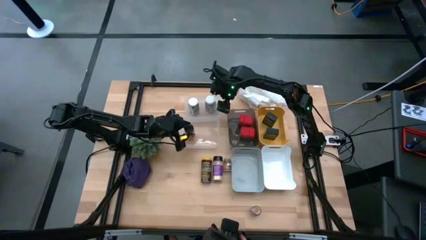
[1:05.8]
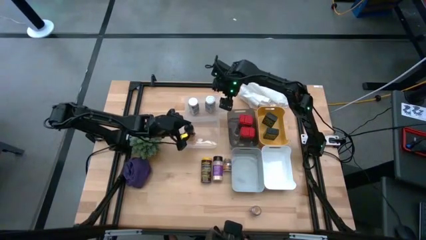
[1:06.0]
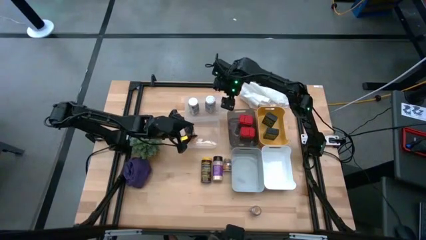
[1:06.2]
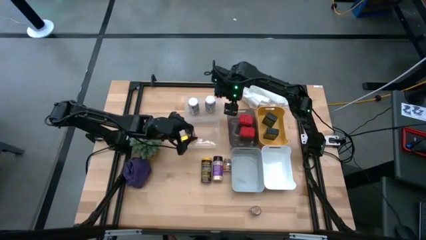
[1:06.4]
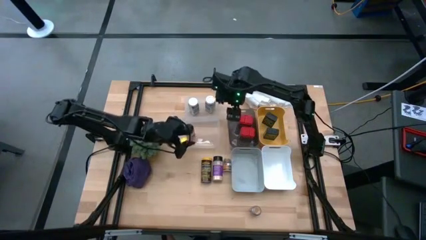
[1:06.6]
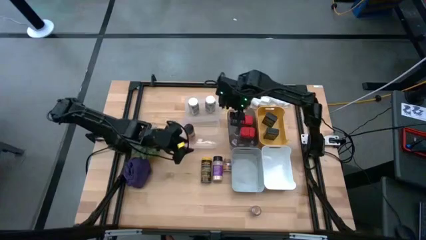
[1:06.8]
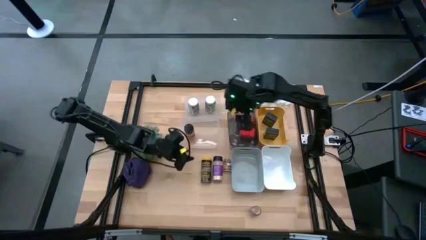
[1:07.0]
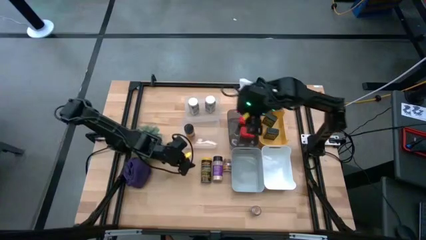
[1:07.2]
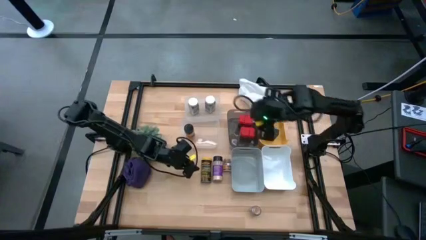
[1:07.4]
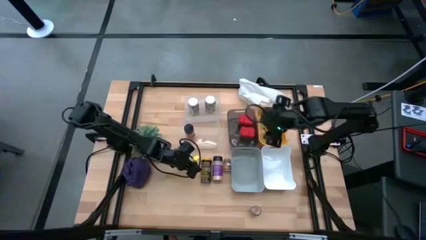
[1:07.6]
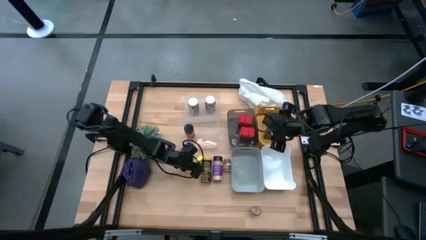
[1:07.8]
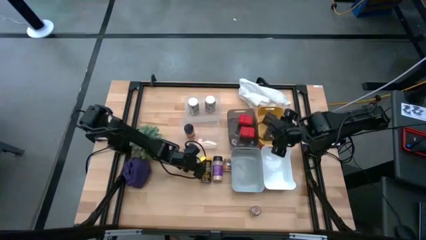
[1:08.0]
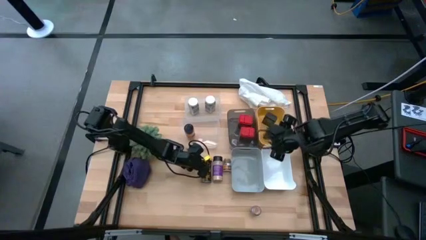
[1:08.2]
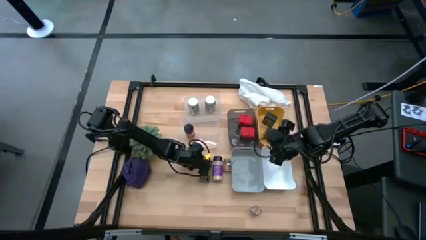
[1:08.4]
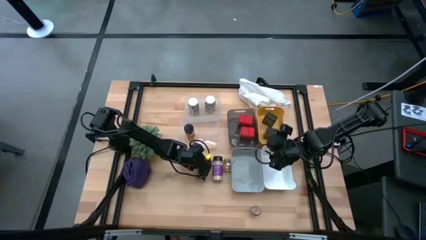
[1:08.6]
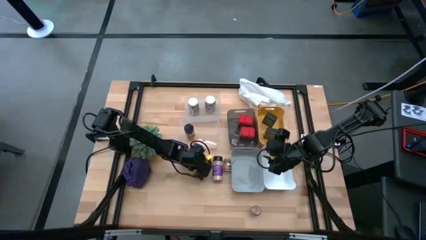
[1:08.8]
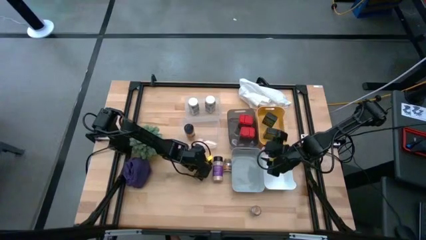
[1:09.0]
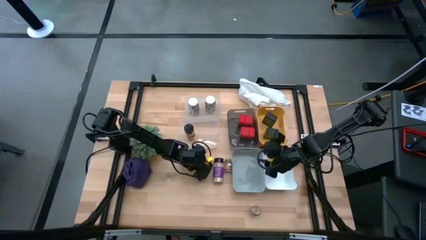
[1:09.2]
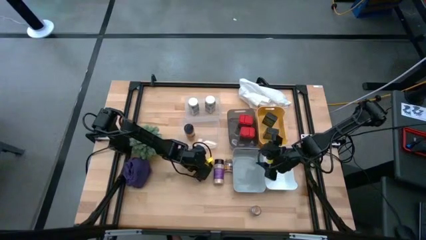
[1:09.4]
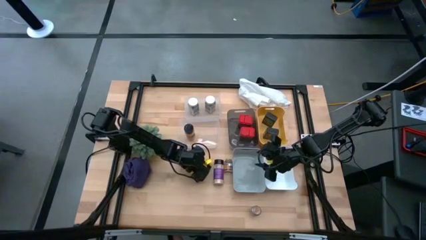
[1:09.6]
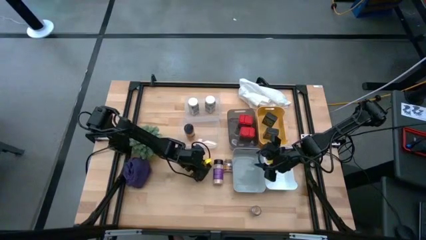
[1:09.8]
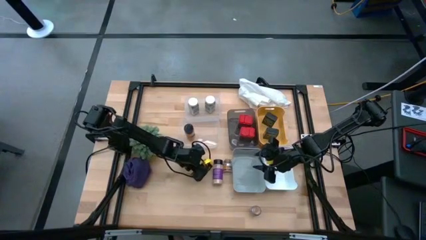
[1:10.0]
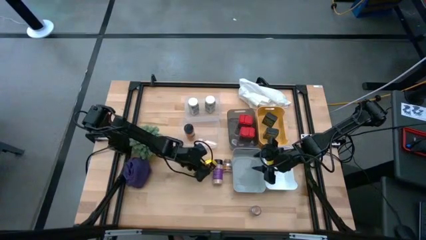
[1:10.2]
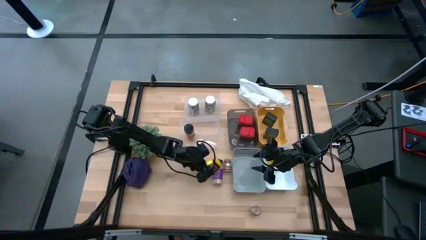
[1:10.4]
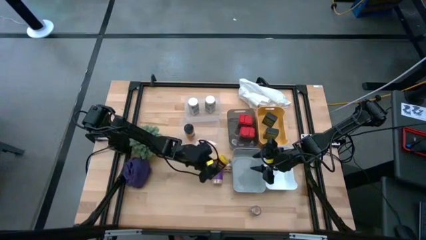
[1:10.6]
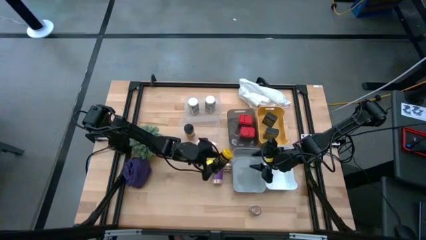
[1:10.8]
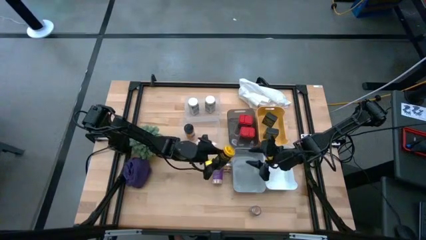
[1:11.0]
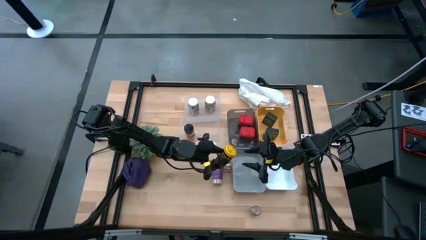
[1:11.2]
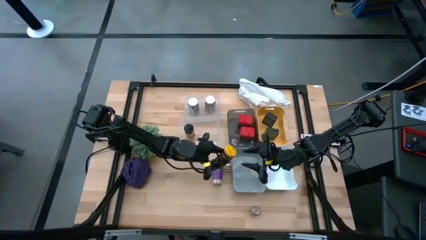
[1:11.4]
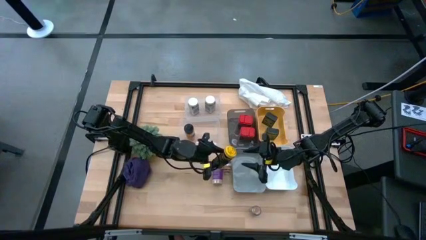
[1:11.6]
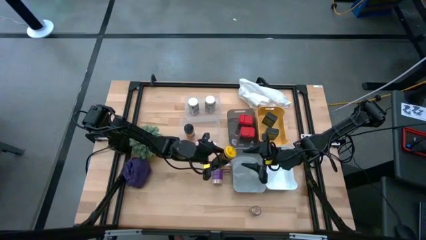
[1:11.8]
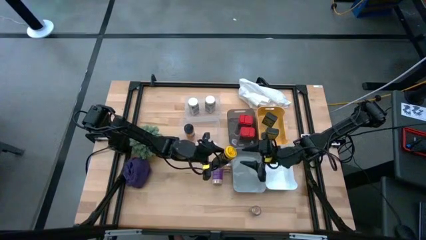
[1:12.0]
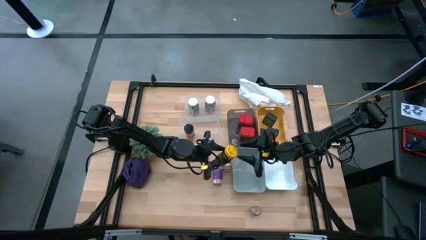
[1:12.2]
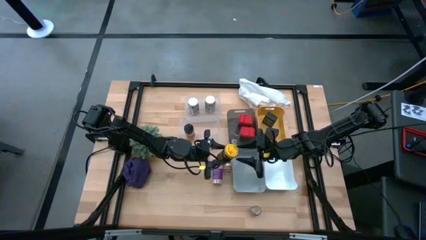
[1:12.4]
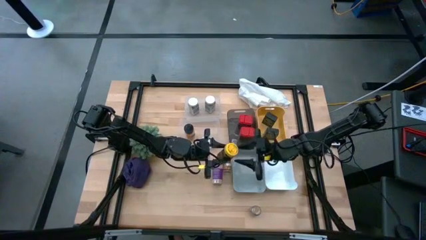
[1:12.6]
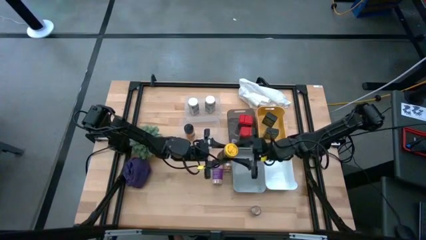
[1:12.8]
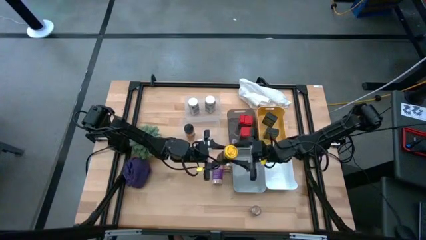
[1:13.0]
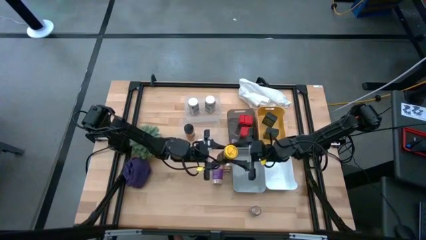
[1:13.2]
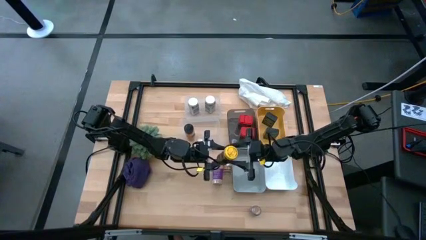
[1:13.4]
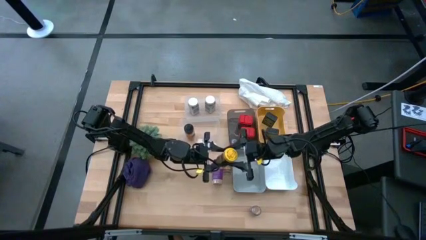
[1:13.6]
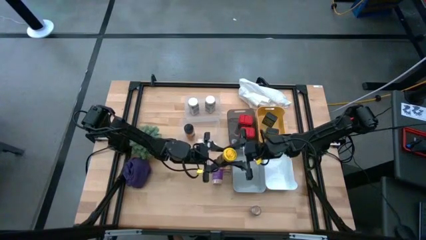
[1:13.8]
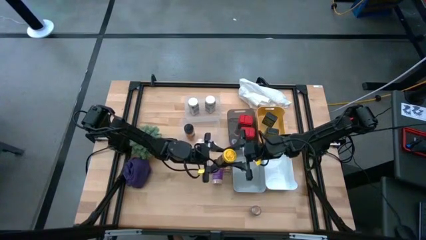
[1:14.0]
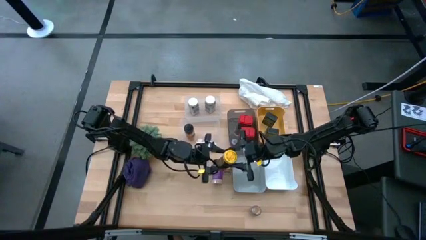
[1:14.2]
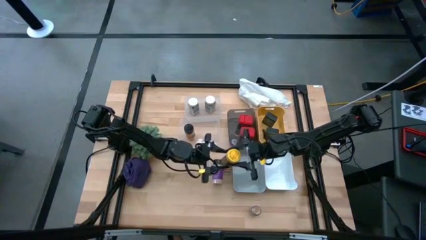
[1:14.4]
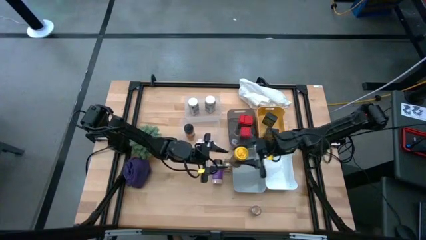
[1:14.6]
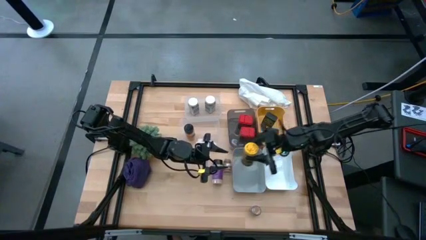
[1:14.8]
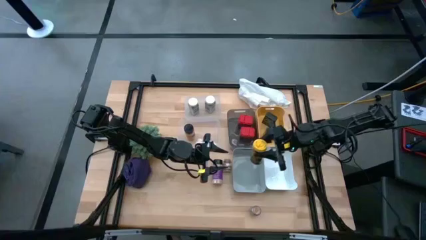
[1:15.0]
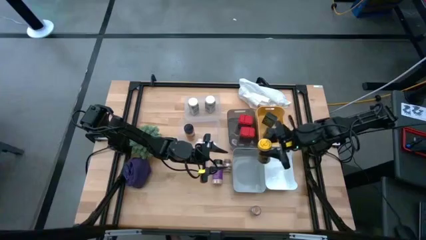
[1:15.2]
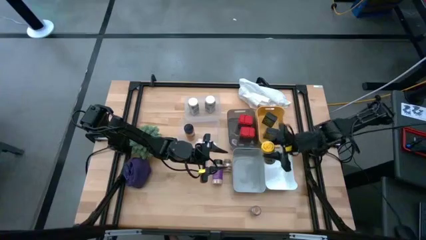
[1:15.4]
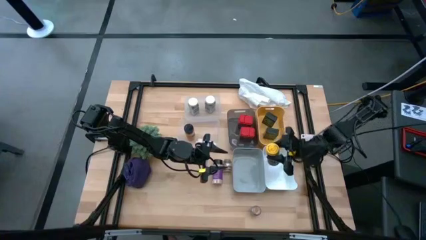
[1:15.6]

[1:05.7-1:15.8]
Task: Sort spices by type
Put the yellow seasoning bottle into the white bin

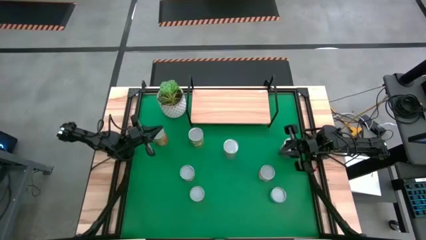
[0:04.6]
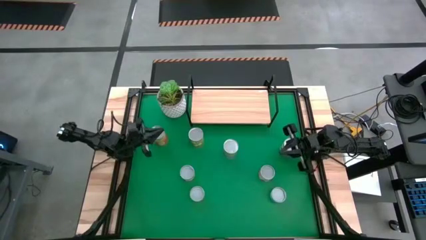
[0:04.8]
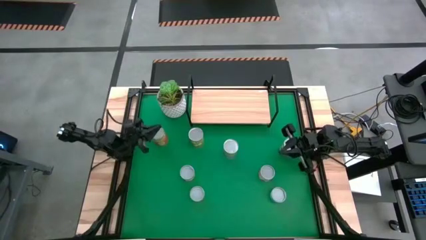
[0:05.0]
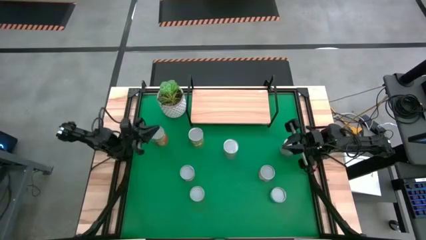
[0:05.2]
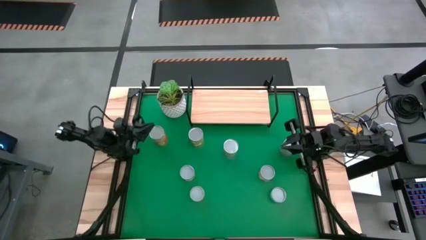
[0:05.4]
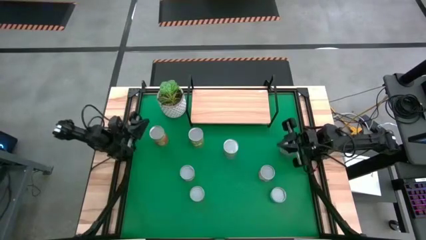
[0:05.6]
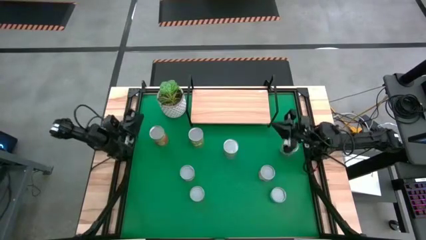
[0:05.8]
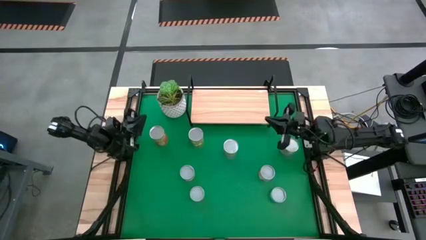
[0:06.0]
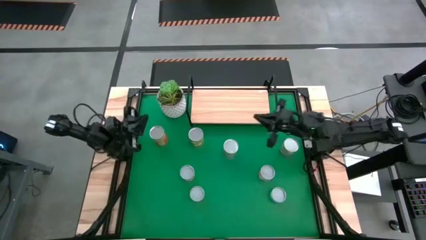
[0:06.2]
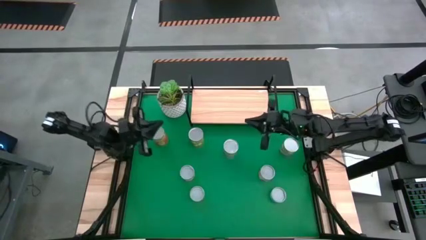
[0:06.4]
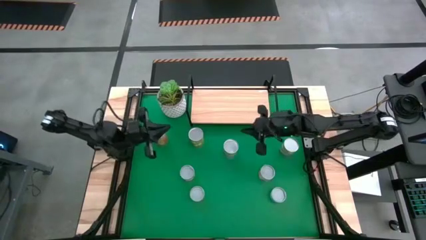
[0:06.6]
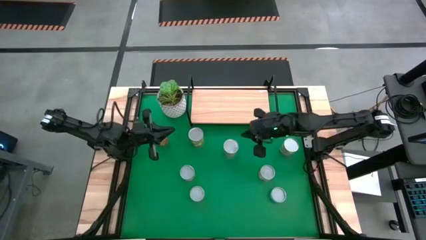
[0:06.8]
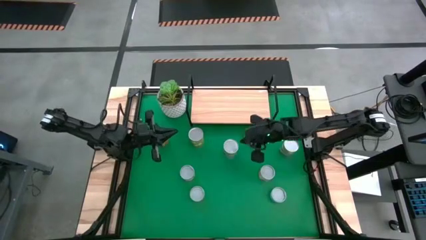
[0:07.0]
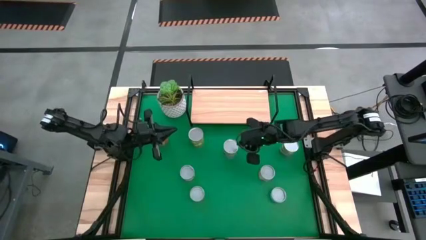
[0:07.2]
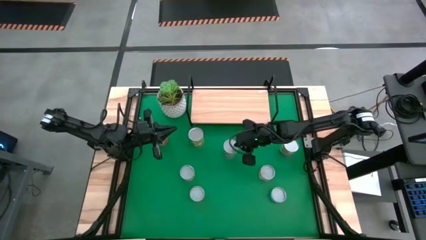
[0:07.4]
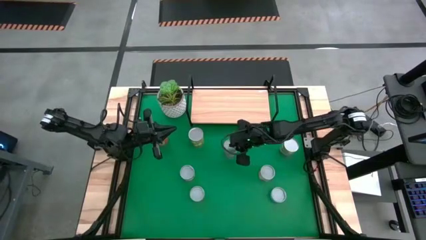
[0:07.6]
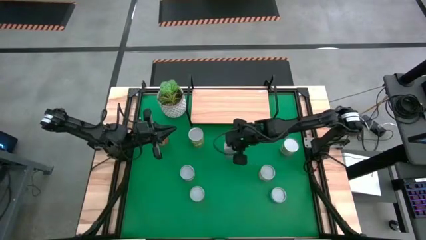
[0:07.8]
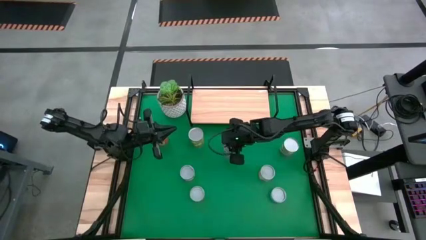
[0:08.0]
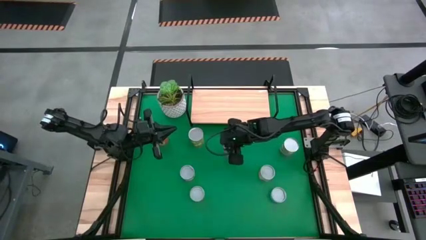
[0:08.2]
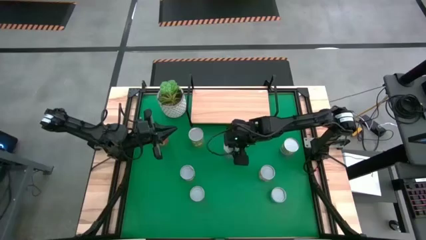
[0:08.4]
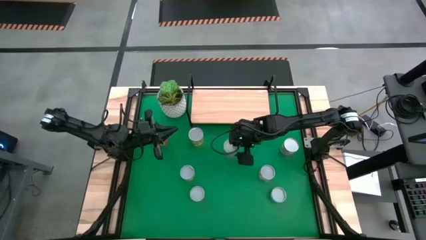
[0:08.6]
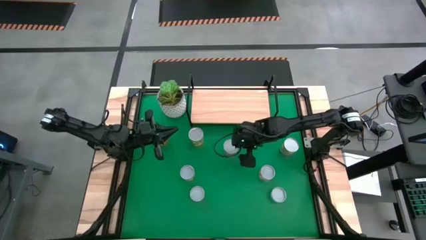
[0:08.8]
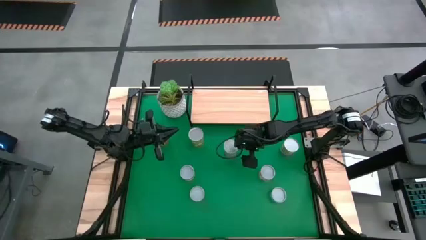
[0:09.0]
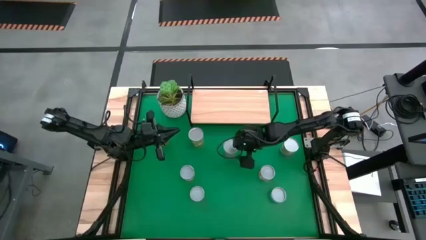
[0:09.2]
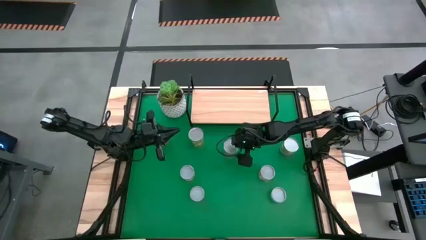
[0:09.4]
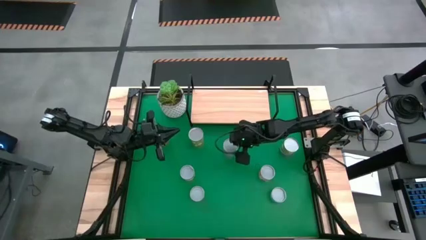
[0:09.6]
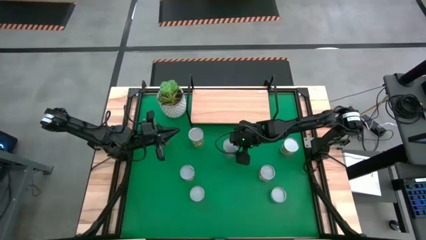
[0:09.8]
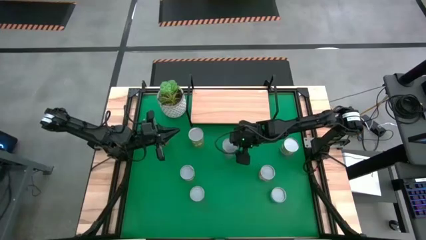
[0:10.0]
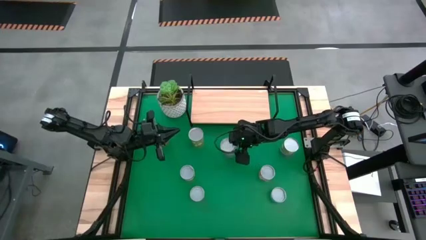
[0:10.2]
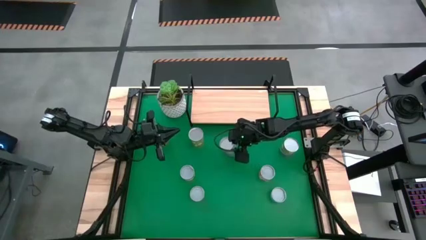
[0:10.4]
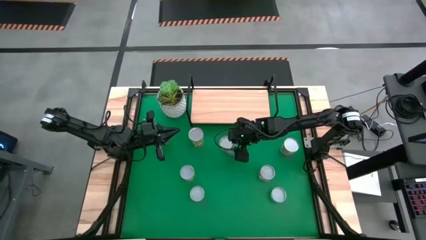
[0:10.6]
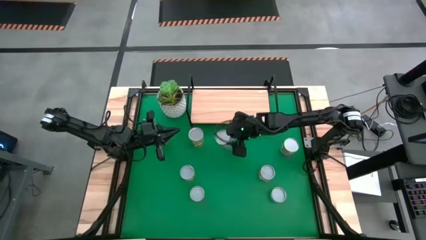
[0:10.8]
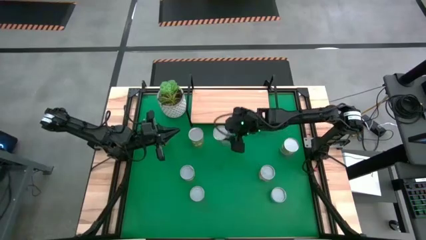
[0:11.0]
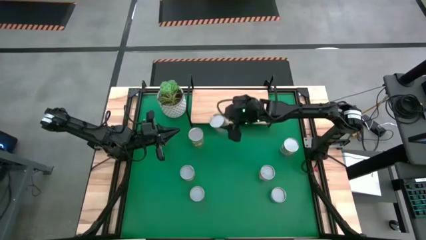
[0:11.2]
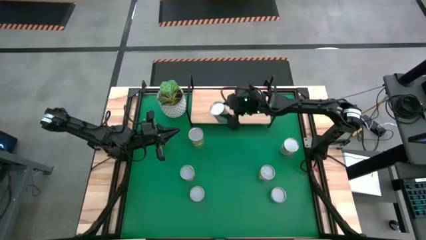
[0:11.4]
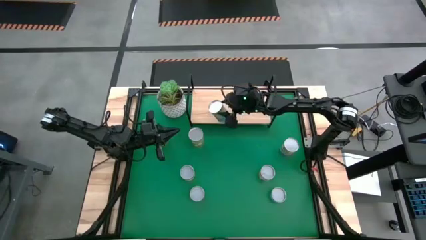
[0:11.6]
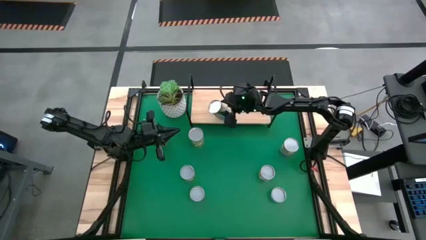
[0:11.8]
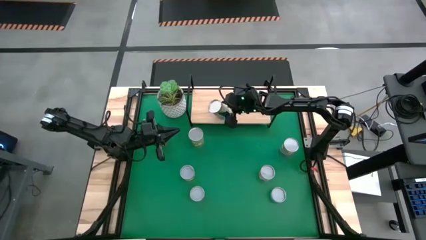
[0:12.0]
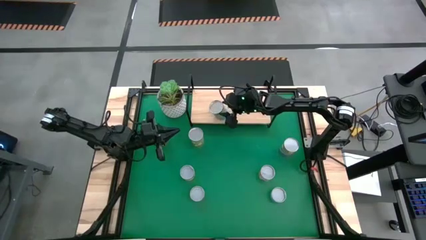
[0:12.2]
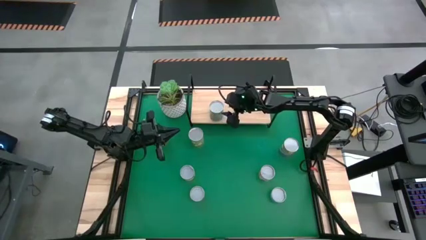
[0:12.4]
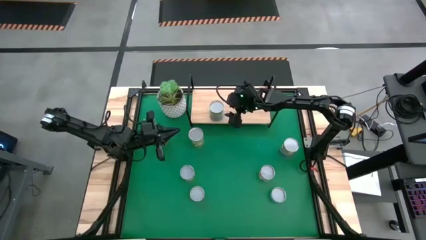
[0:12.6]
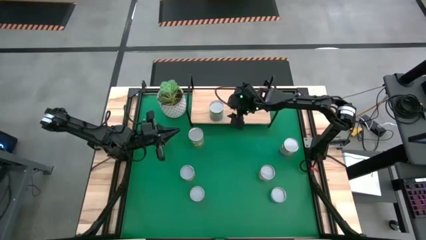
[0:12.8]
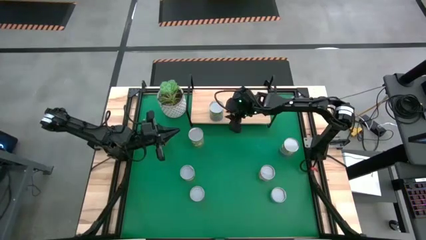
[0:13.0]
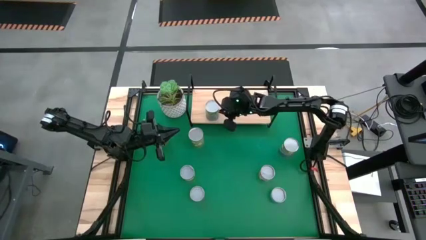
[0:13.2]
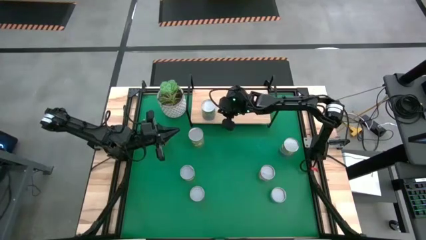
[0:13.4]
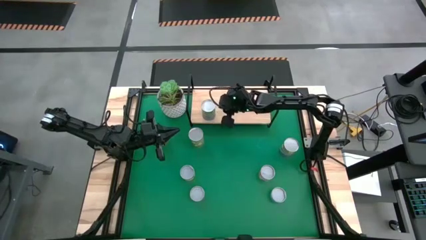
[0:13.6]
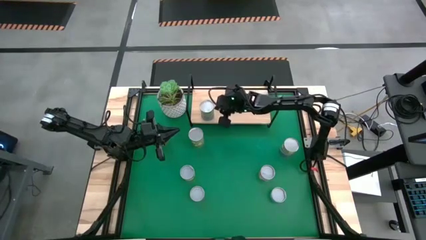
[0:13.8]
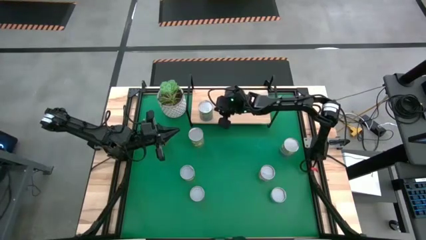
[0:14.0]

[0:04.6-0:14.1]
Task: Pick and place cans onto a shelf
Put the canned cherries on the shelf
